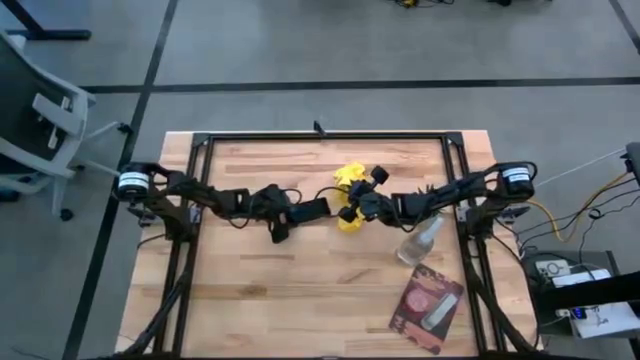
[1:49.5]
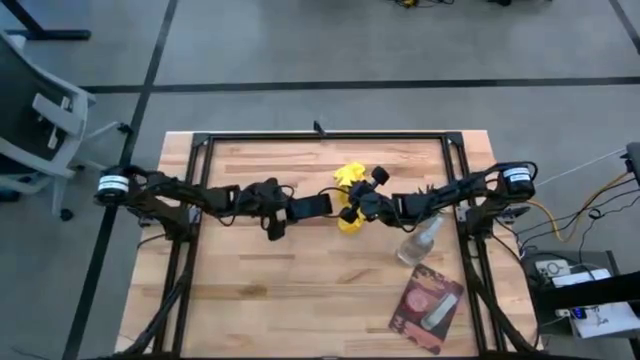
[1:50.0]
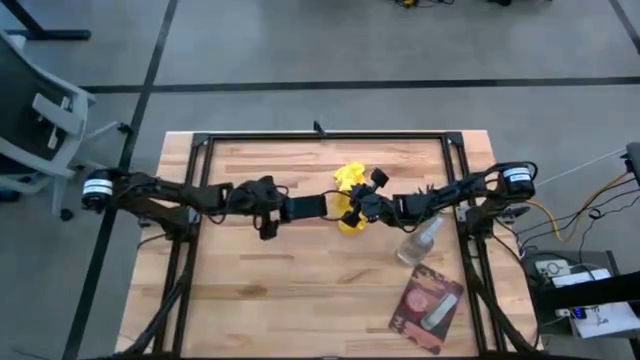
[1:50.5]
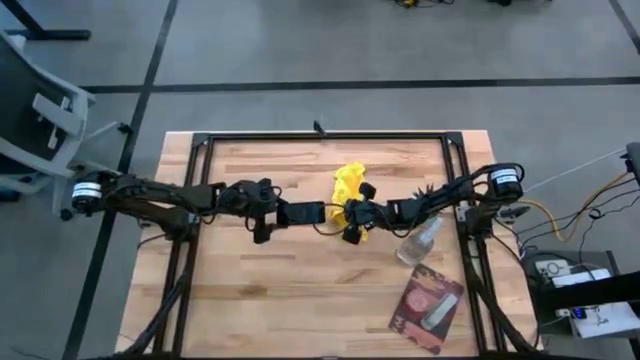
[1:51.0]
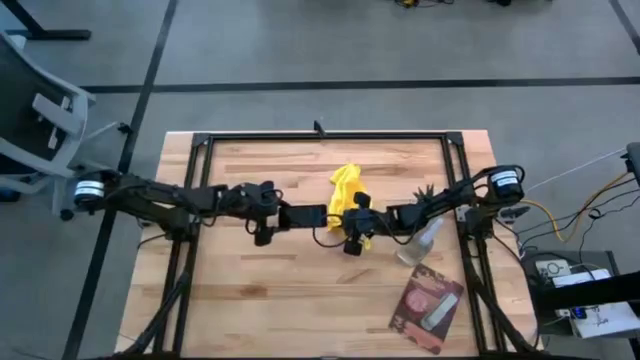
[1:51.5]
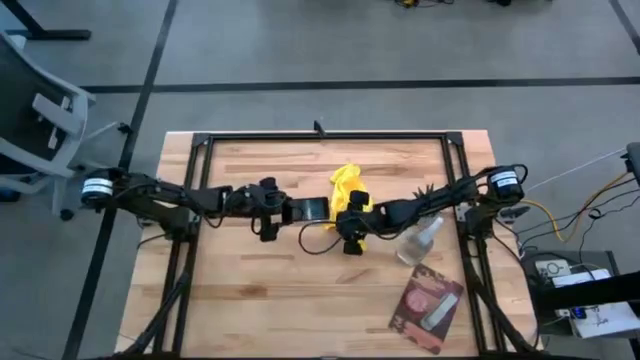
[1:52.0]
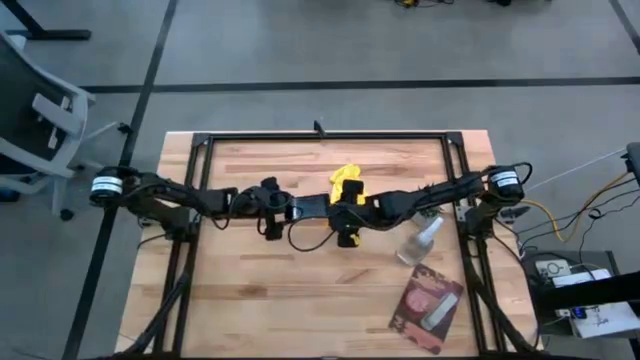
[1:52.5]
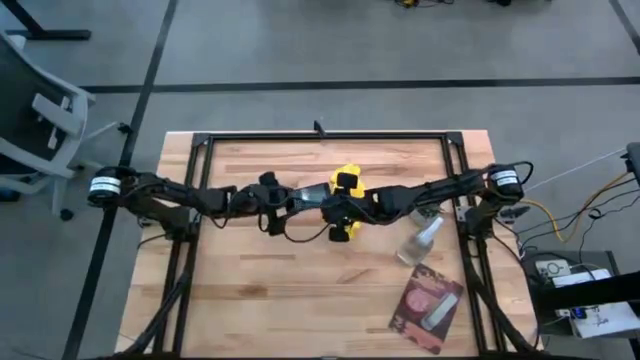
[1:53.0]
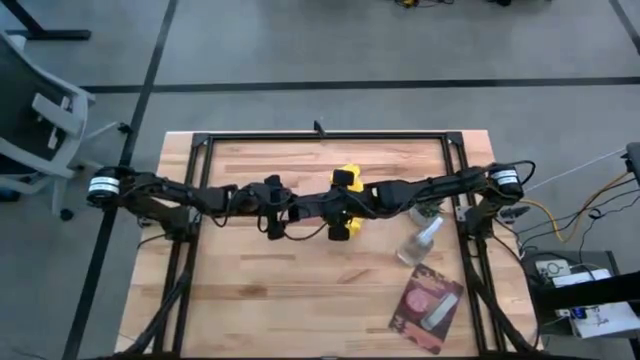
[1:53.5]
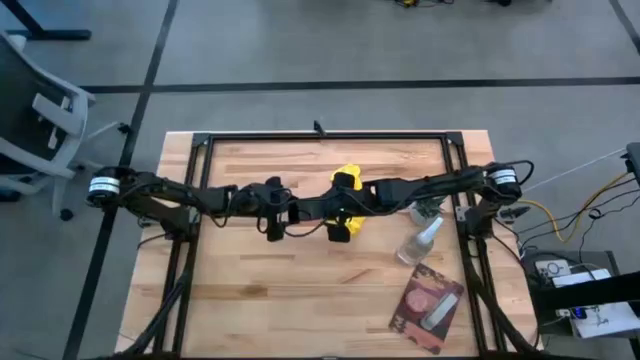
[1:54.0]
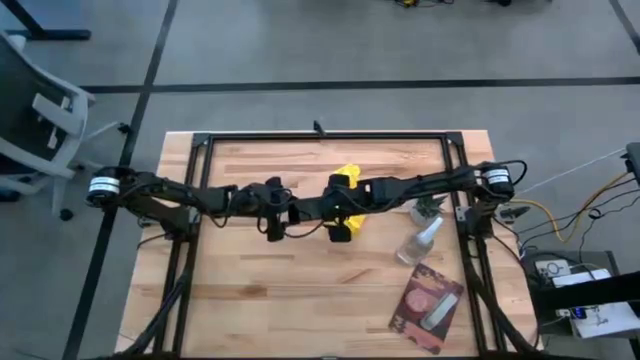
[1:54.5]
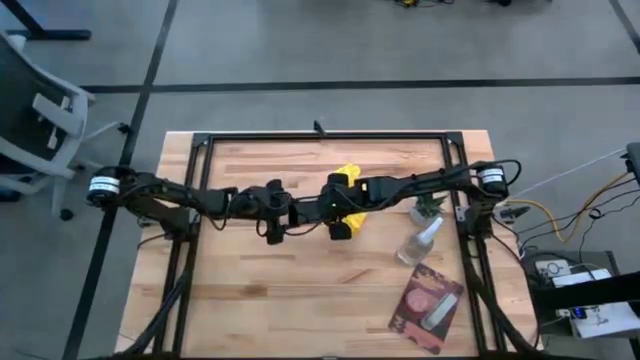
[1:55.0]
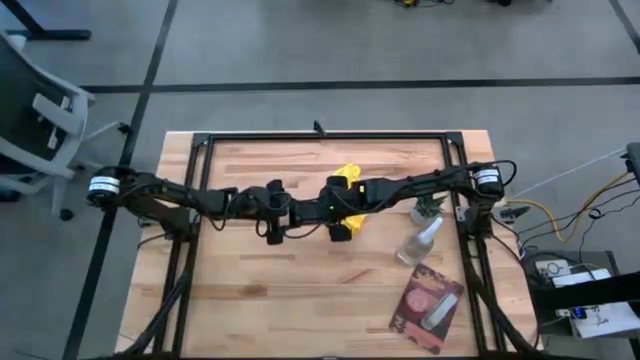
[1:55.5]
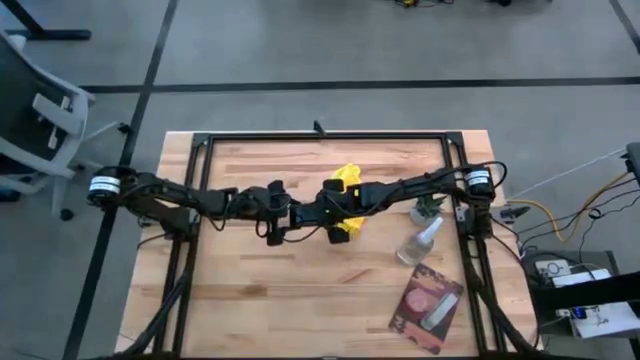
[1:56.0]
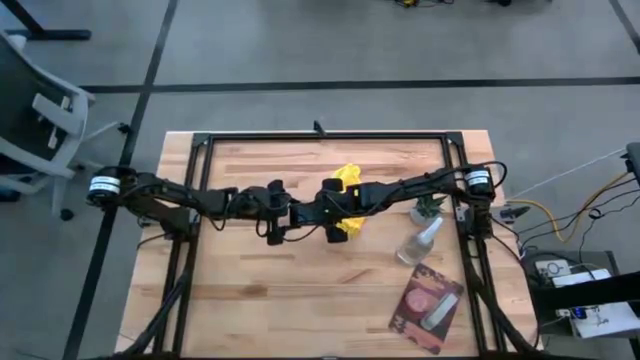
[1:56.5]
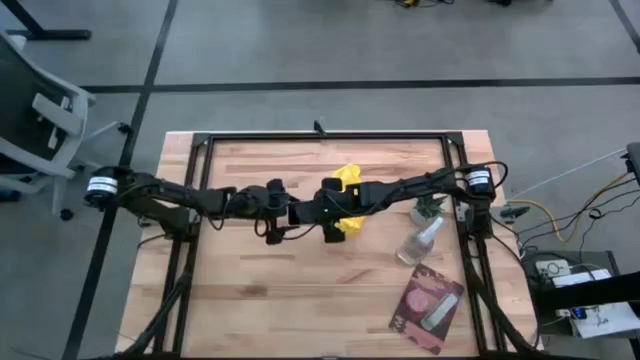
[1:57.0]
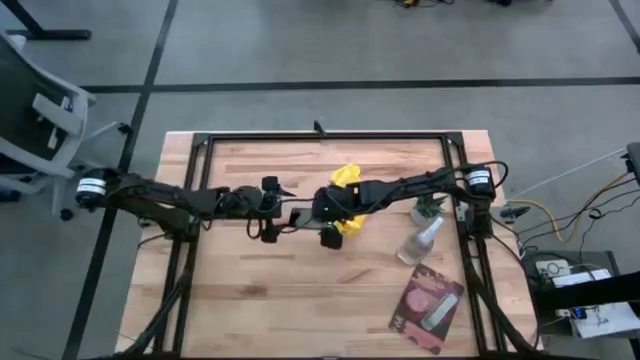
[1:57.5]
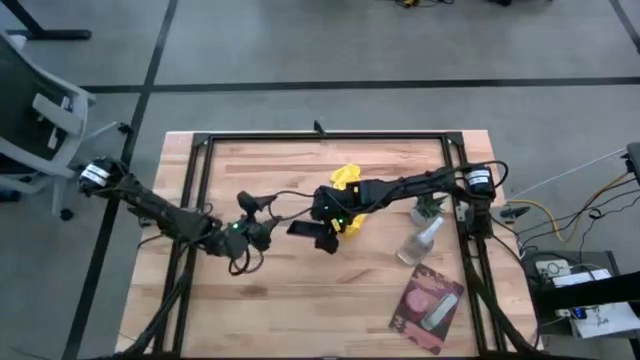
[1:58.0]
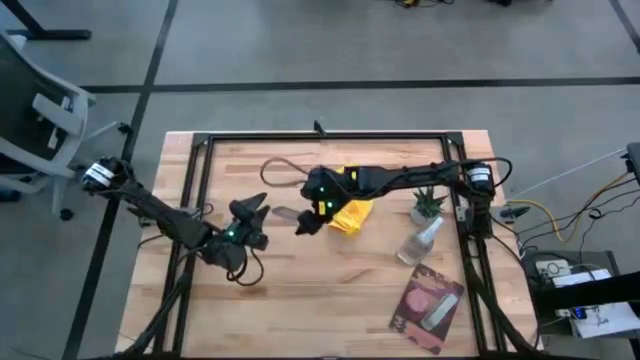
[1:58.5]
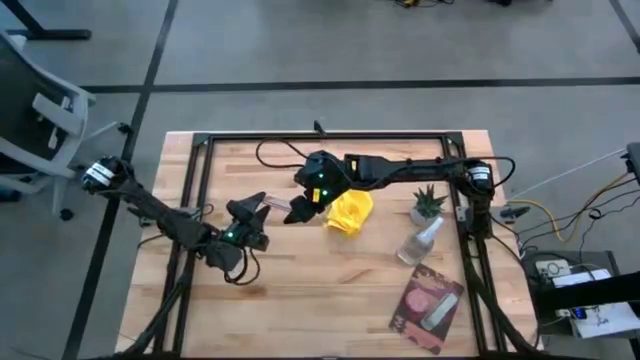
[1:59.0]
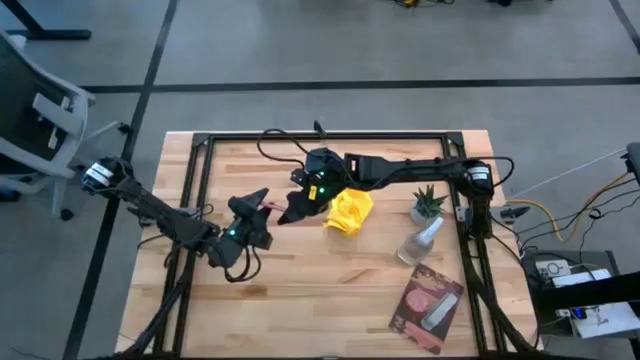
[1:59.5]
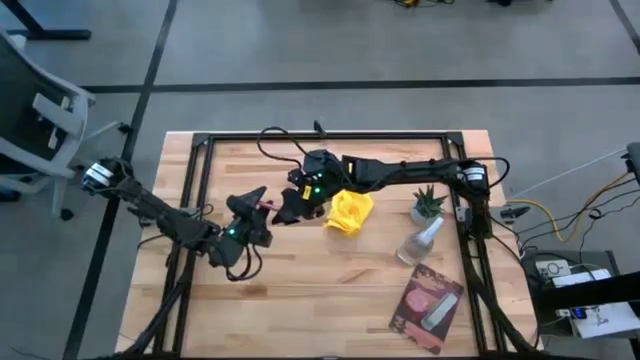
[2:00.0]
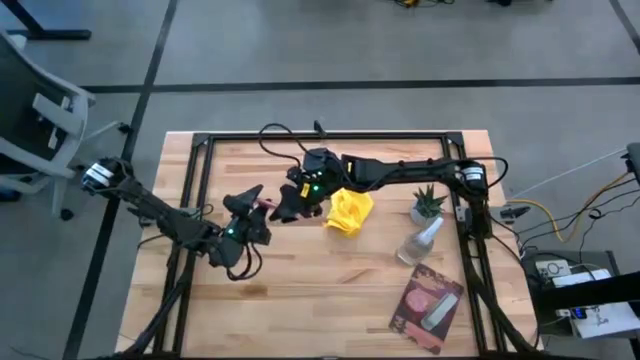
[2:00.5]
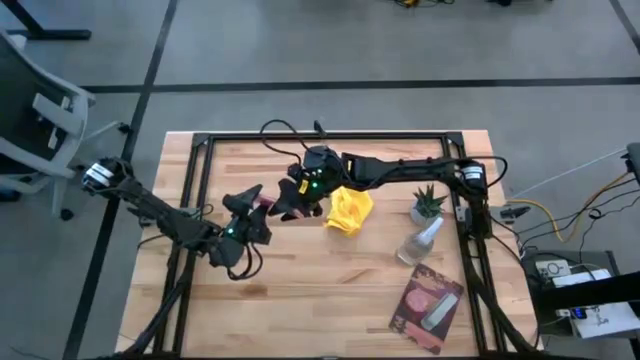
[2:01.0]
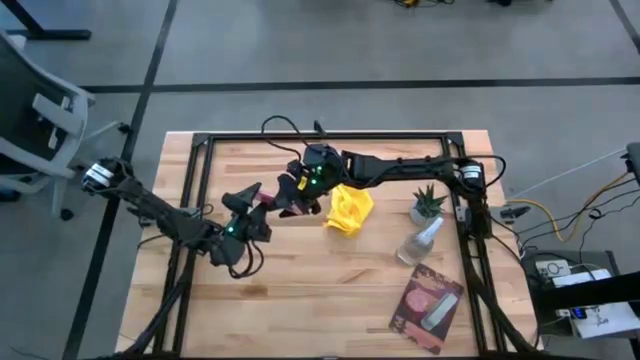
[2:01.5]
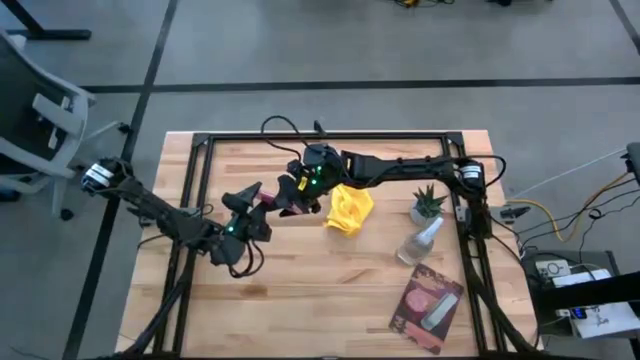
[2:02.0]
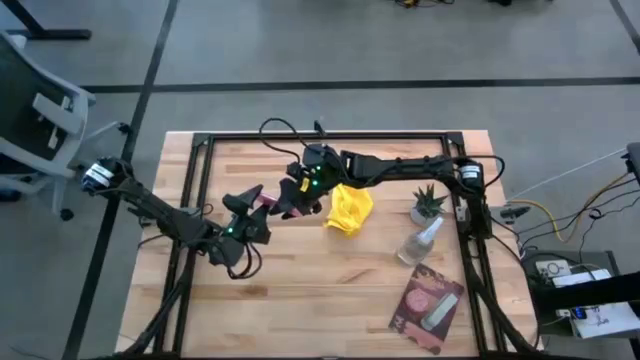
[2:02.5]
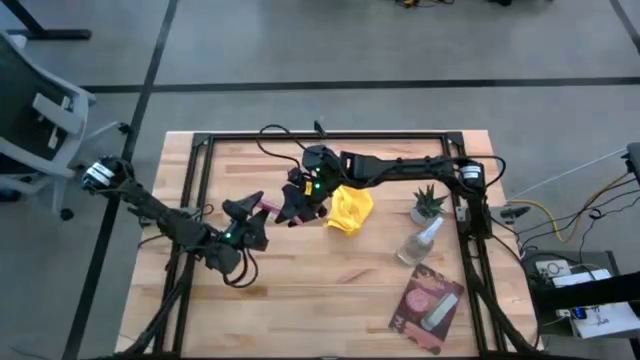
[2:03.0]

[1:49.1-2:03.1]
Task: Apply microfiber cloth
Wipe the back of the pink cellphone with a microfiber cloth

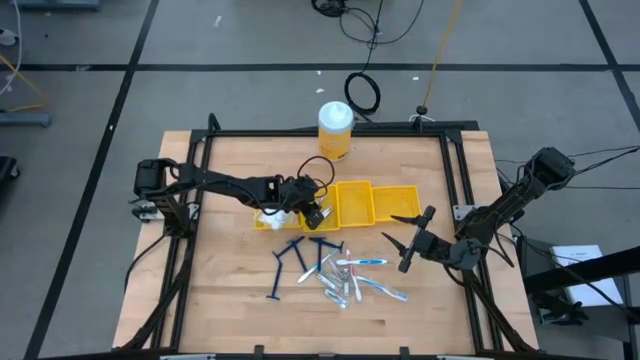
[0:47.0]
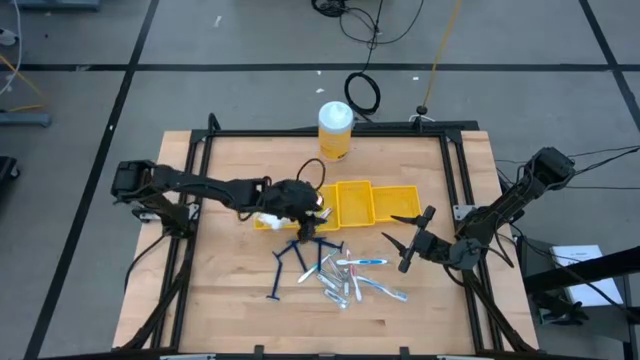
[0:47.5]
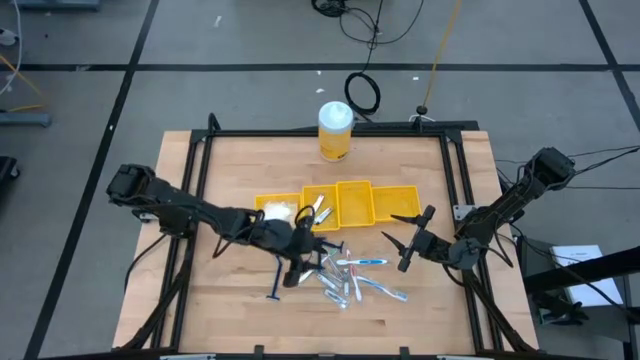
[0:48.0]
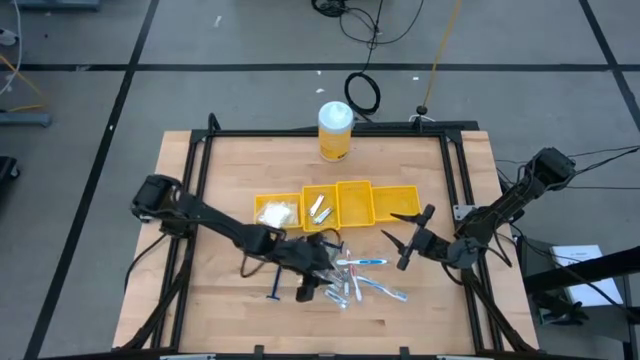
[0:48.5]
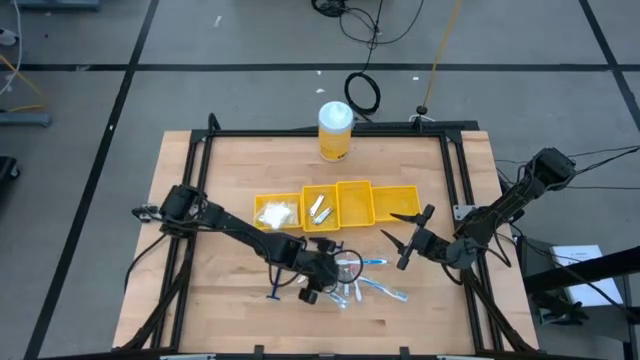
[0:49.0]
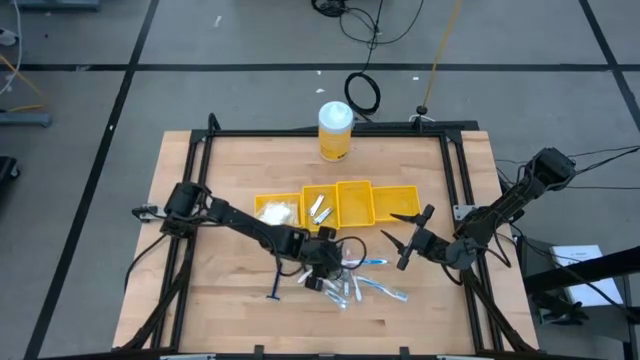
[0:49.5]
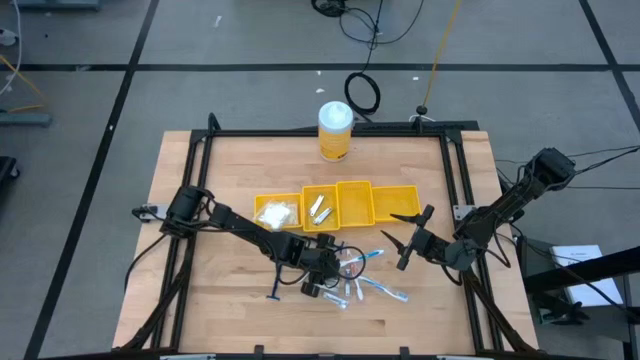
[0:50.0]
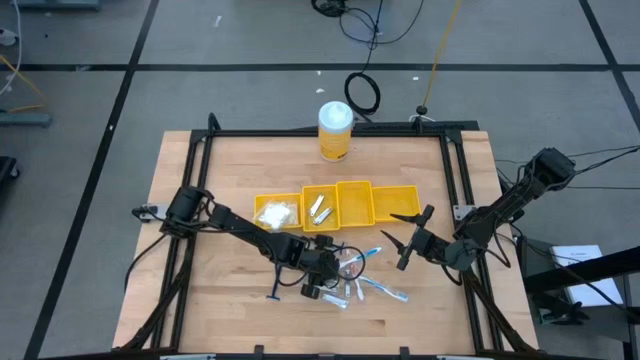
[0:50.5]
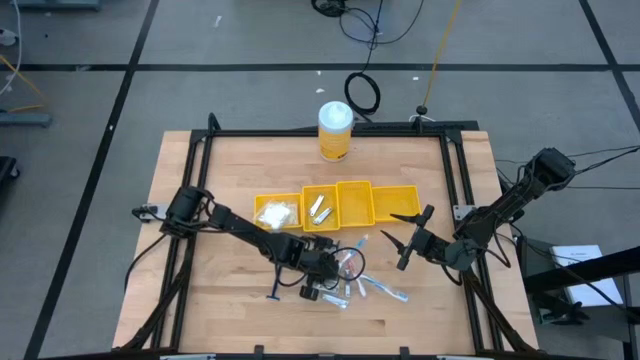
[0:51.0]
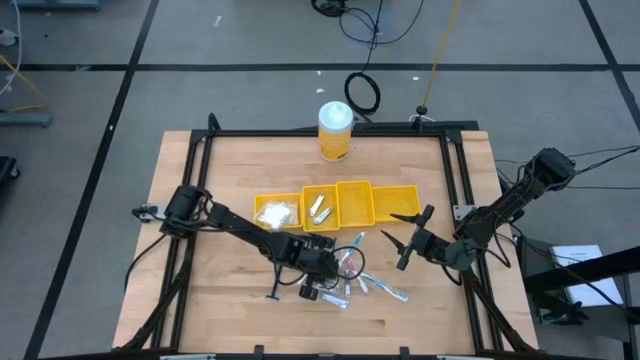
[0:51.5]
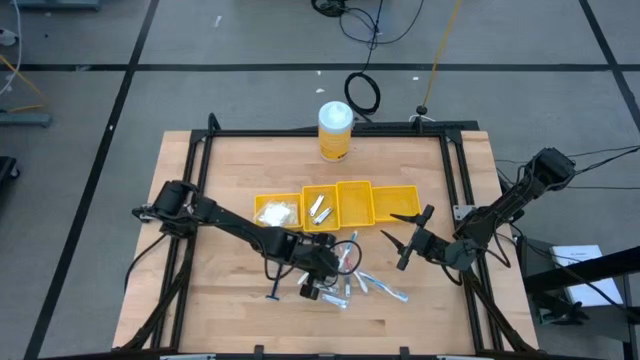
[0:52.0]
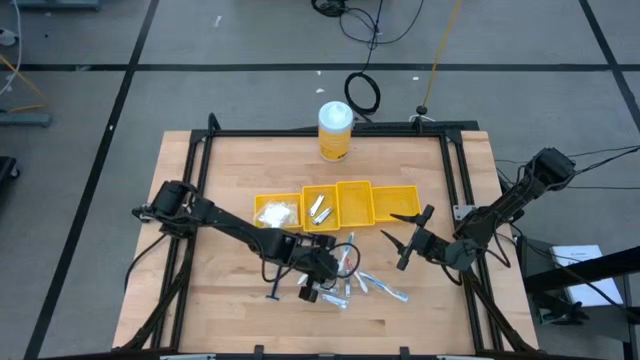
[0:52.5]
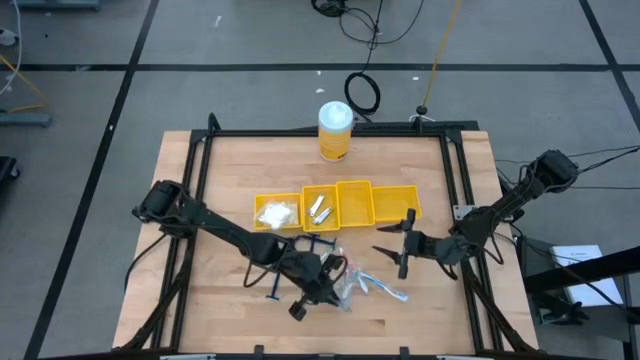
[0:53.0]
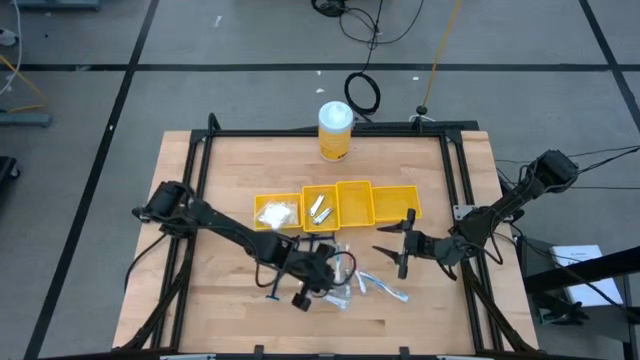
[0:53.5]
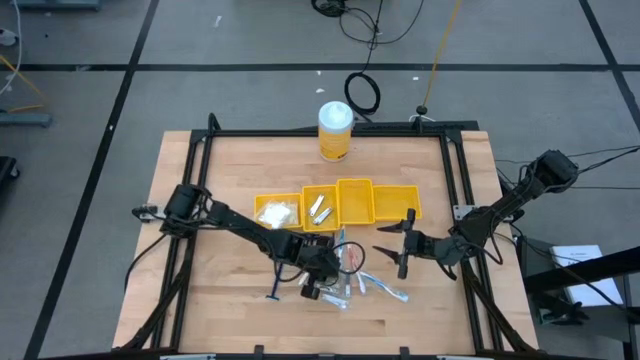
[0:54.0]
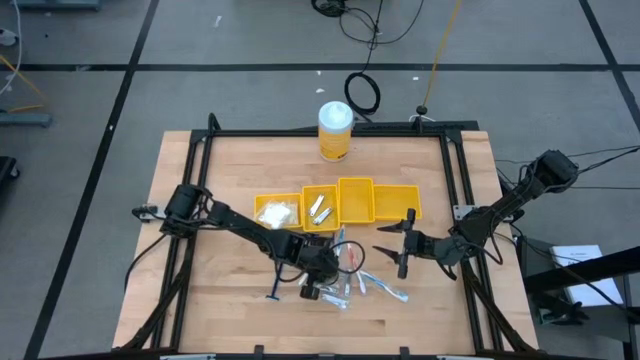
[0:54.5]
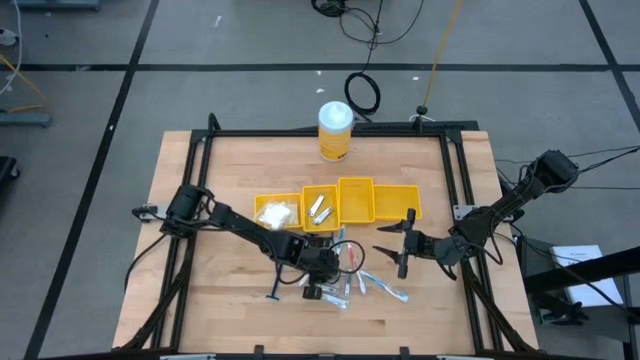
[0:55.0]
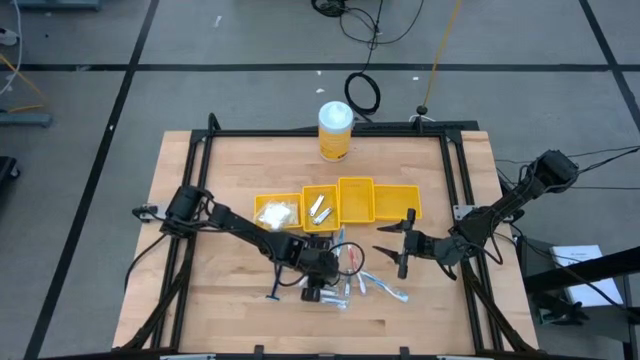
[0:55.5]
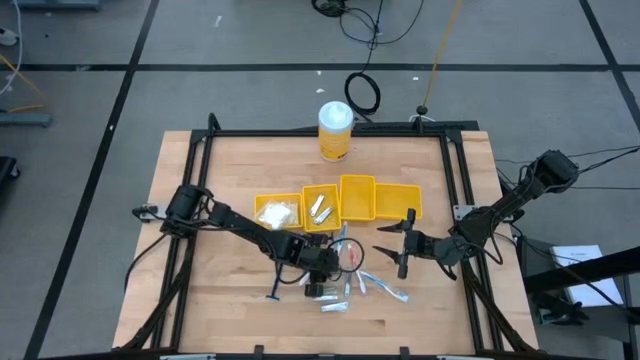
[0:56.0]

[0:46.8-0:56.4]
Task: Pick & Place Travel size toiletries
Put the silver nail cutter into the middle left yellow bin
